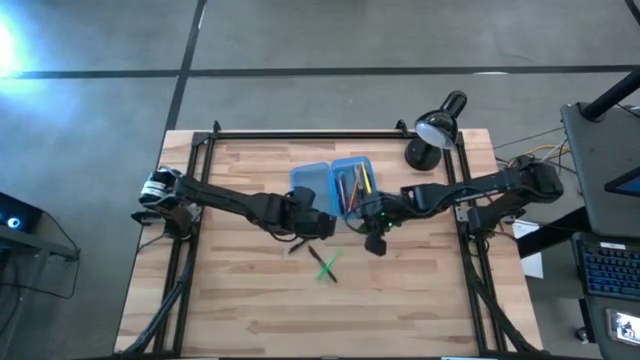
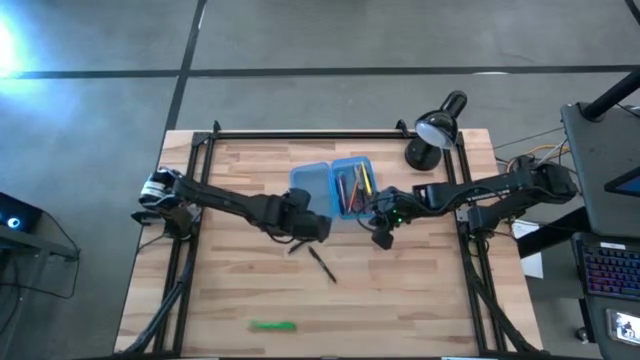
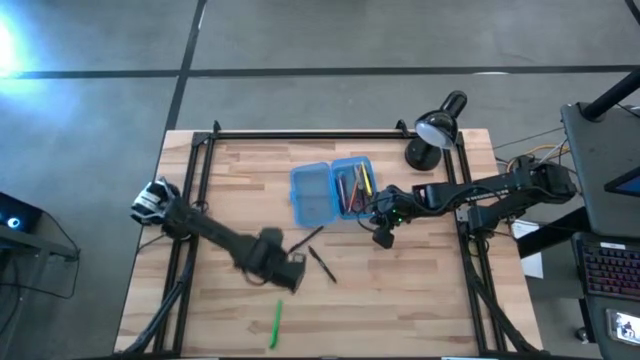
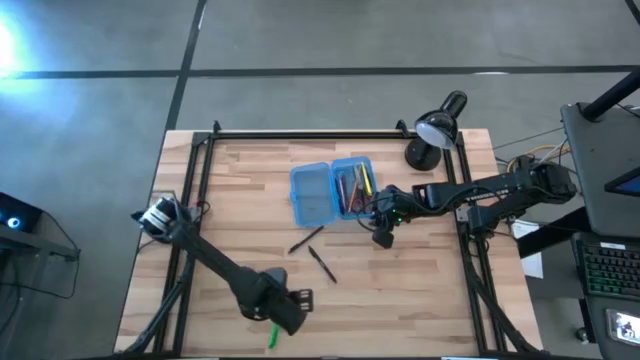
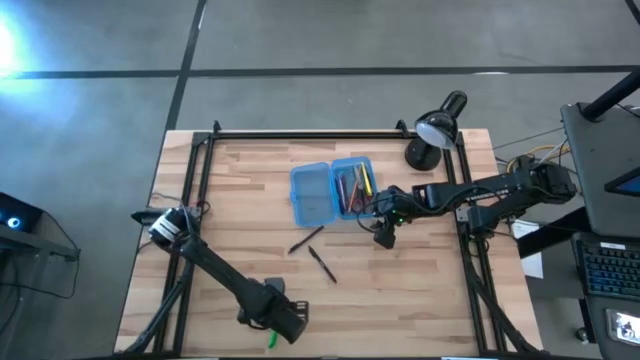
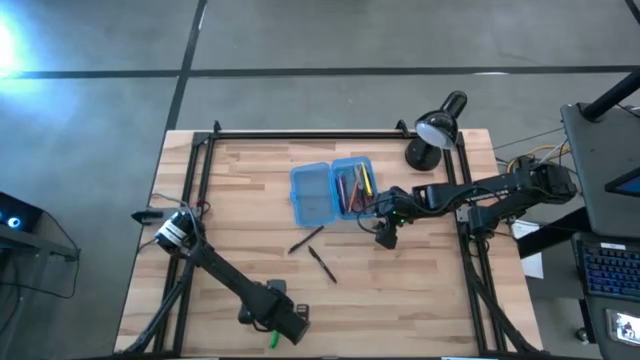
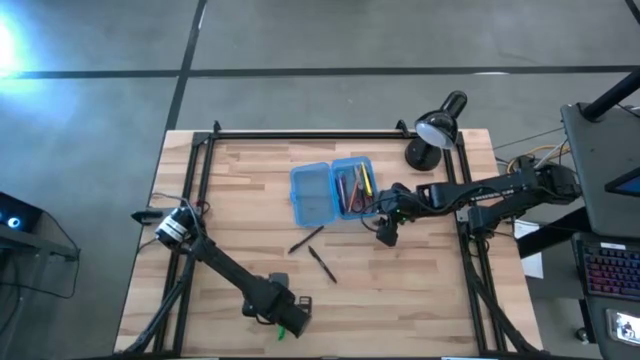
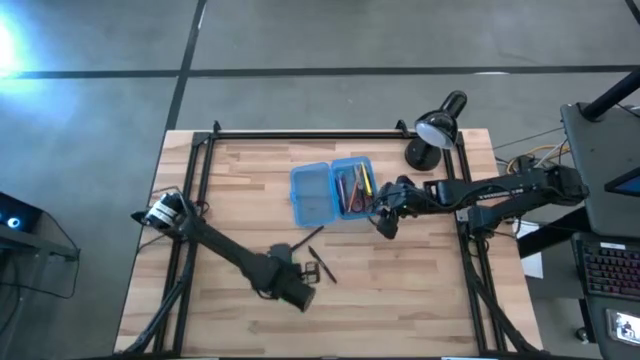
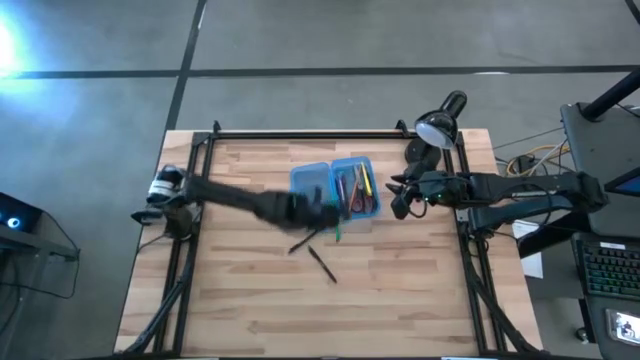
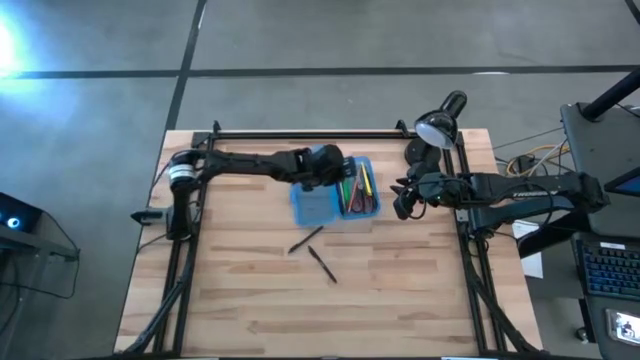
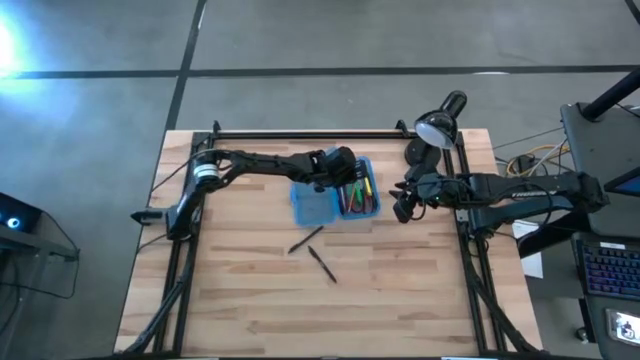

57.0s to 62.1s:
Task: Pick & place school supplies into a supply box
Put the green pen into the supply box

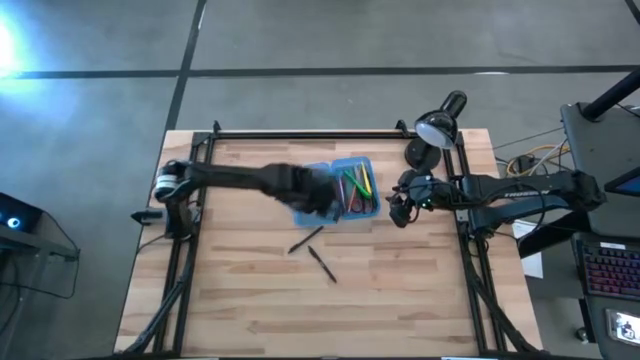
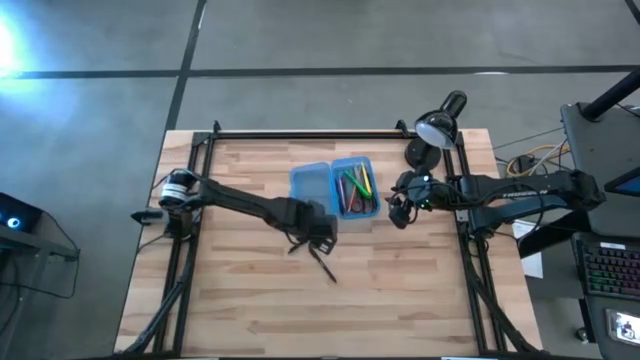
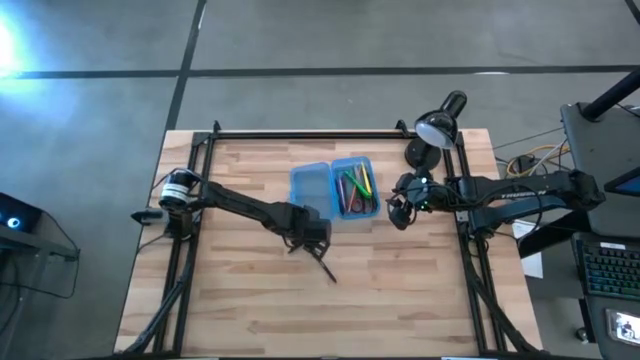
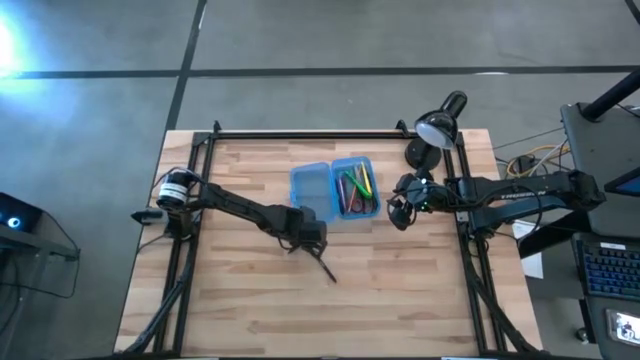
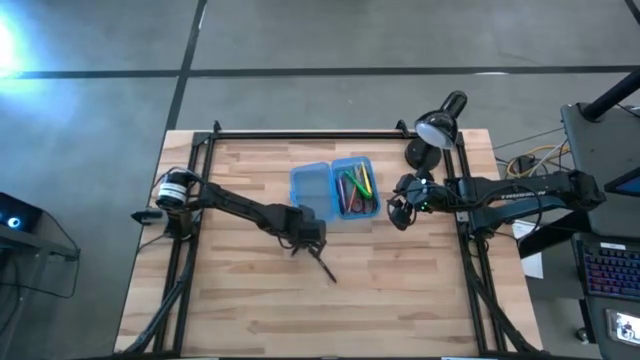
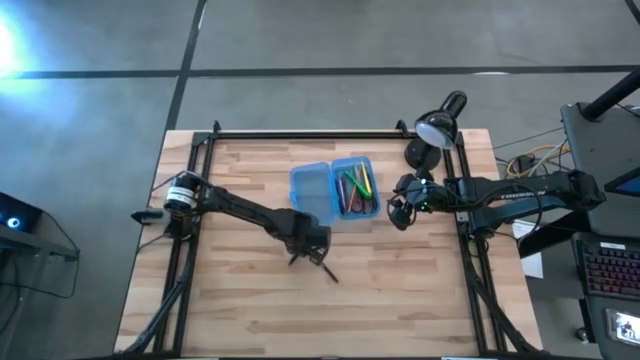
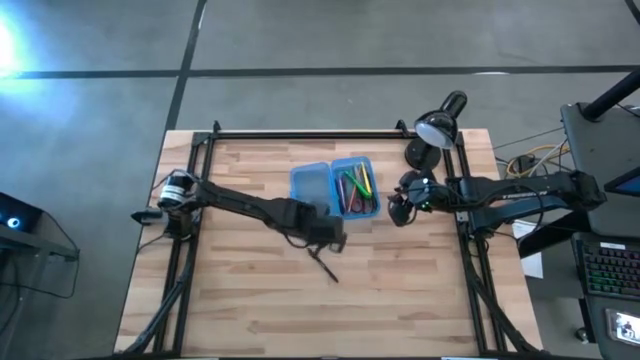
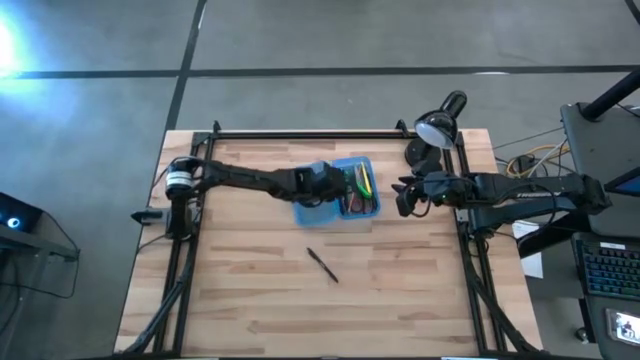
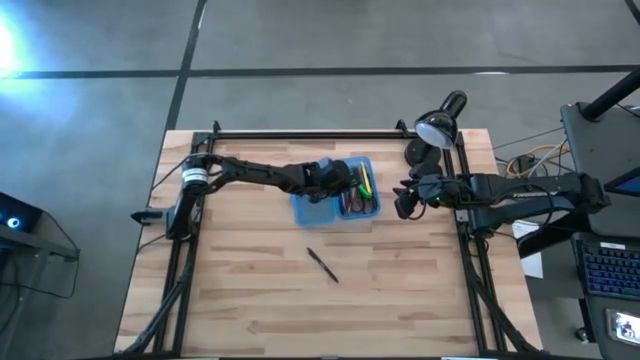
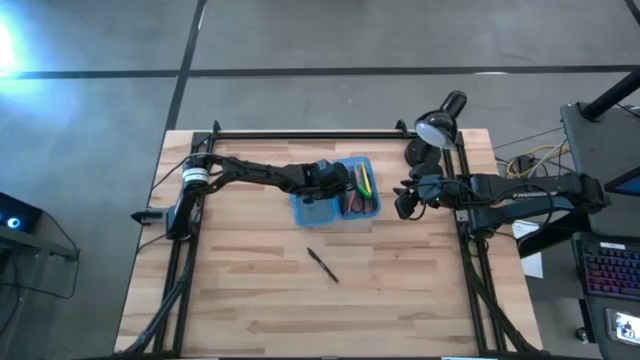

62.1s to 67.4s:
Put the black pen into the supply box

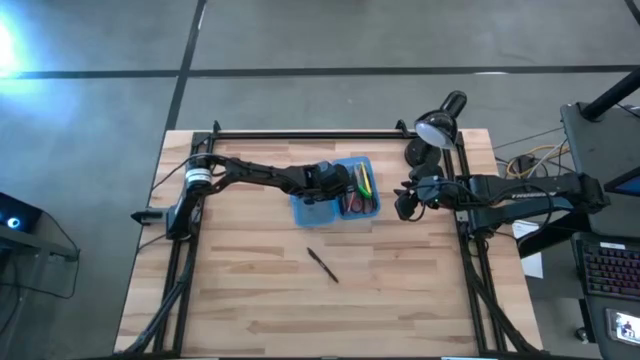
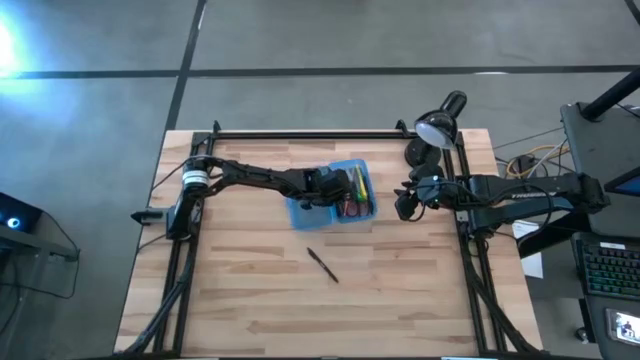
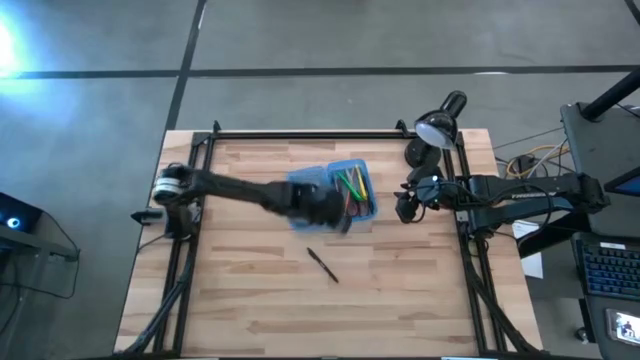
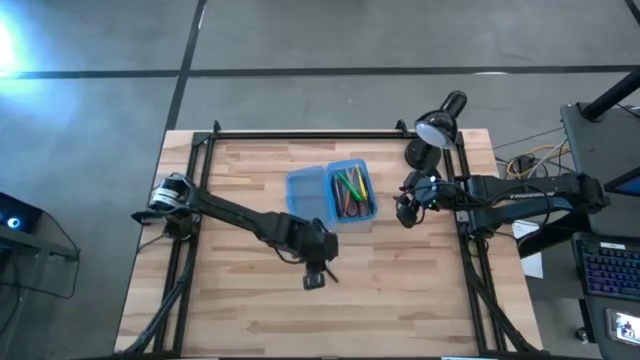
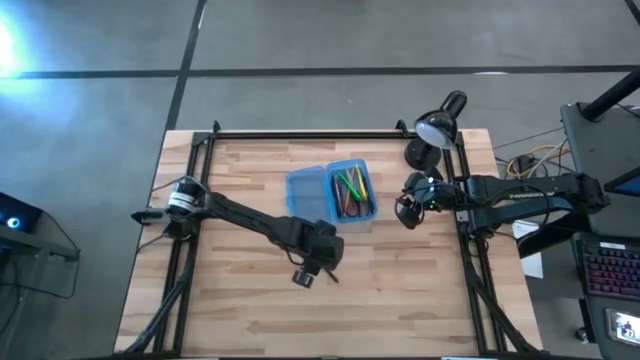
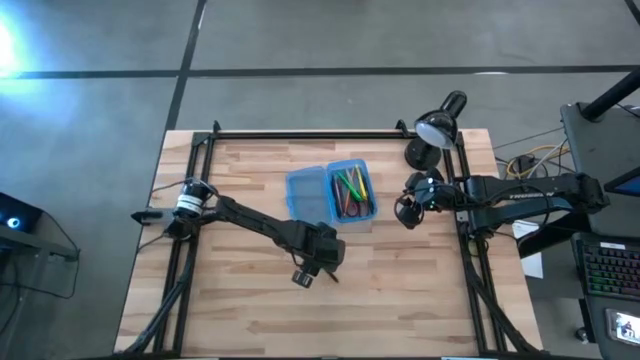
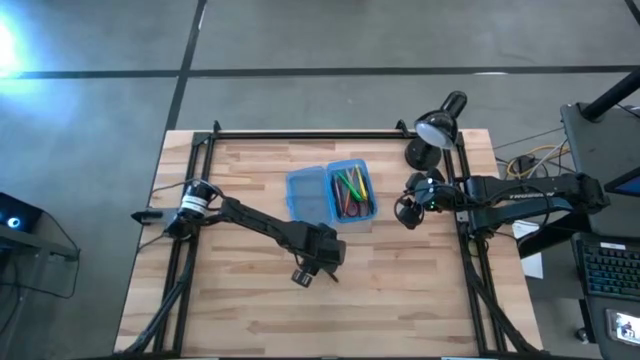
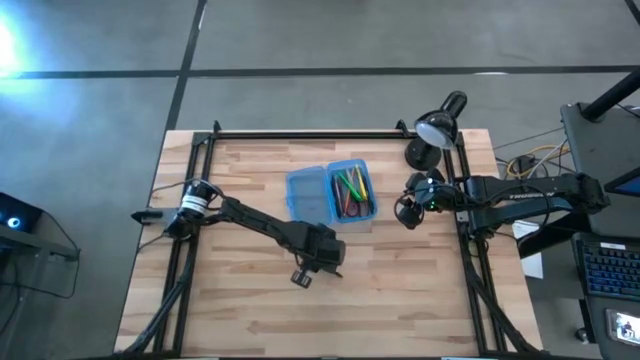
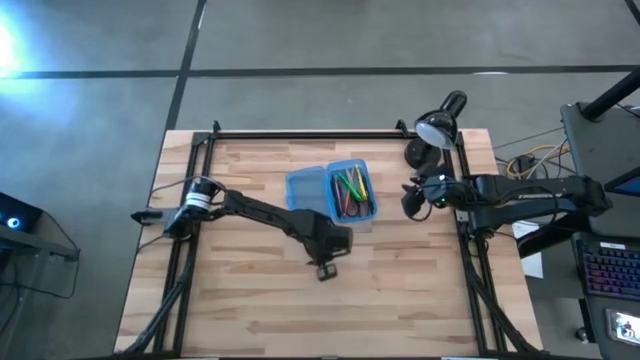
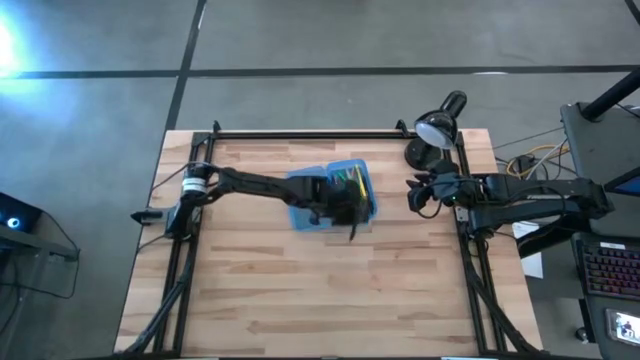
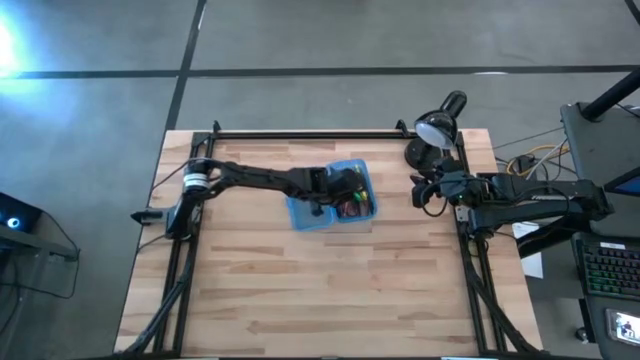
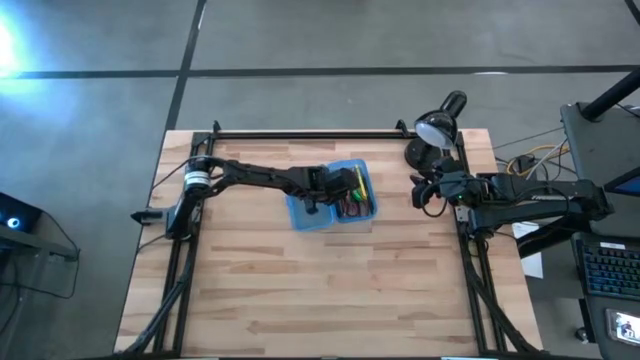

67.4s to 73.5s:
Put the black pen into the supply box

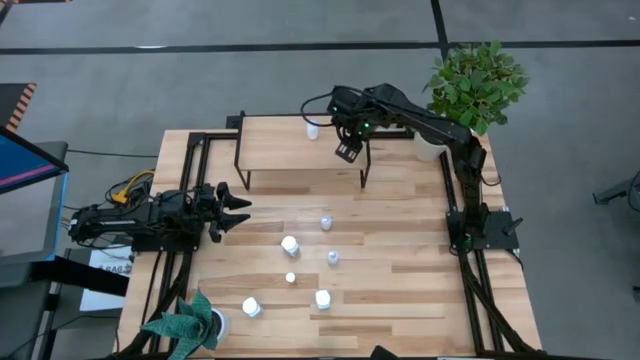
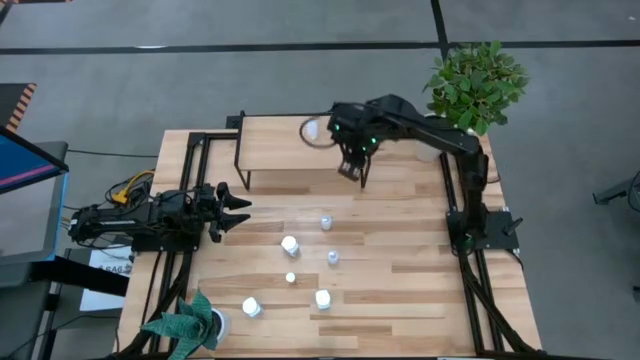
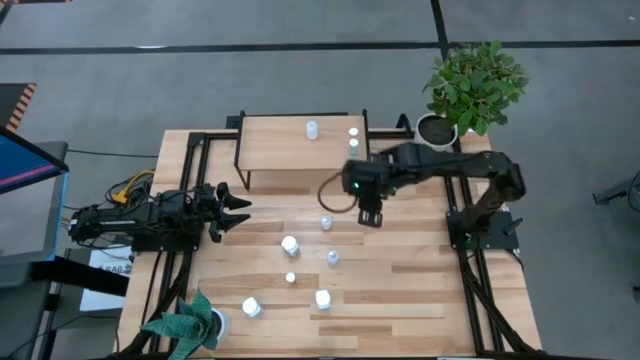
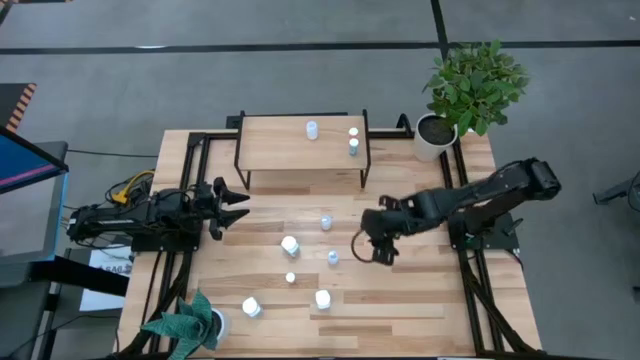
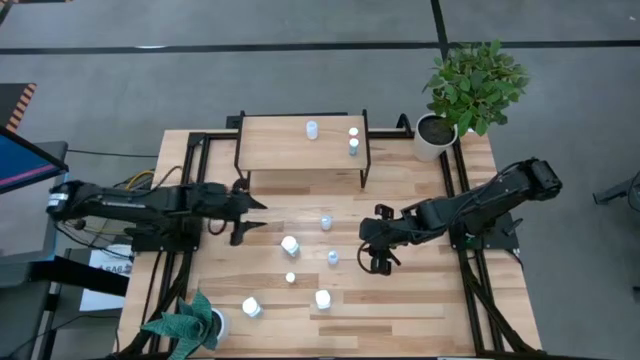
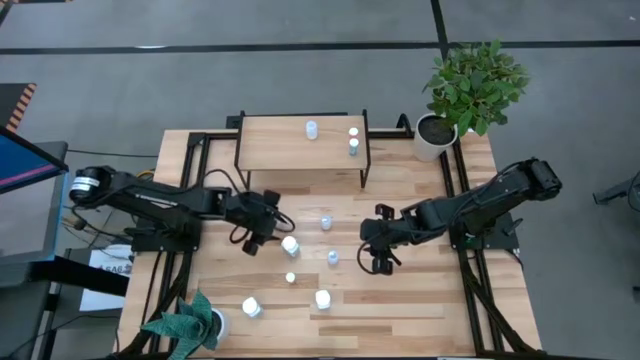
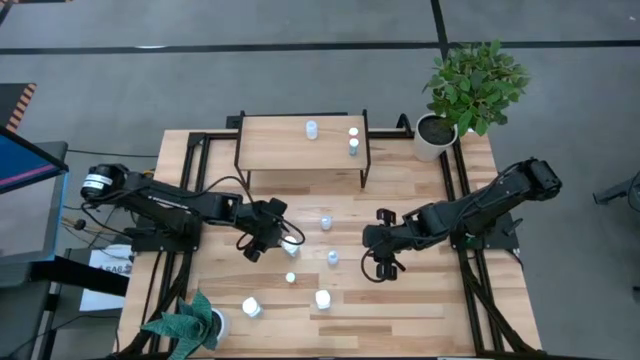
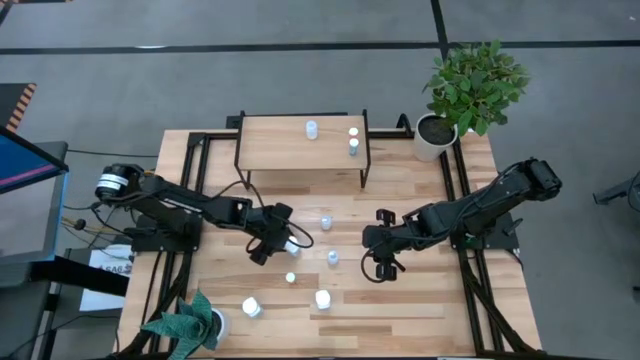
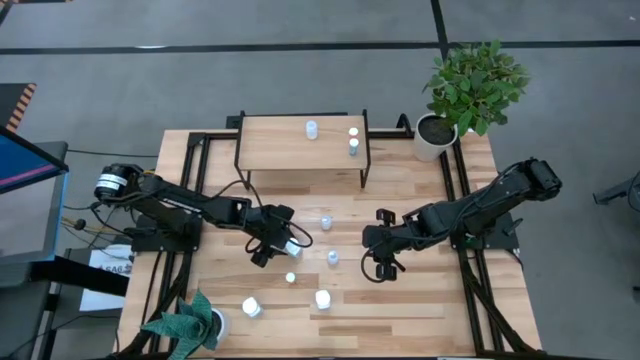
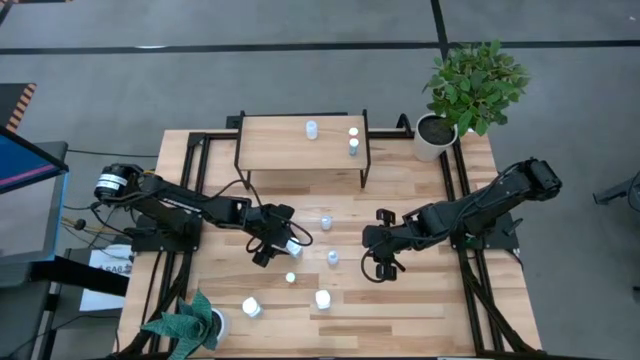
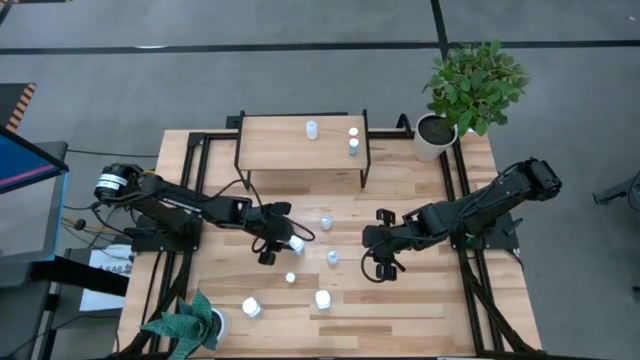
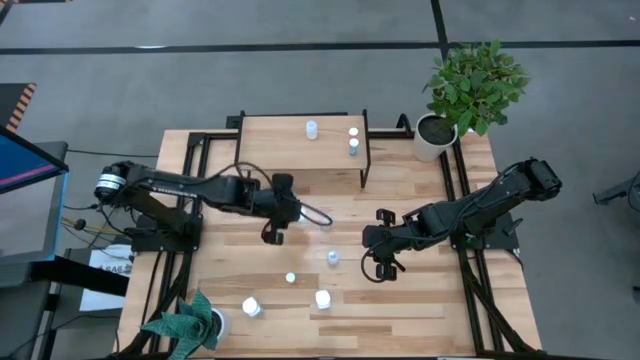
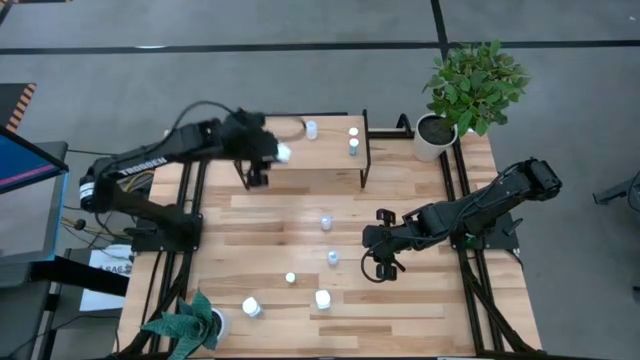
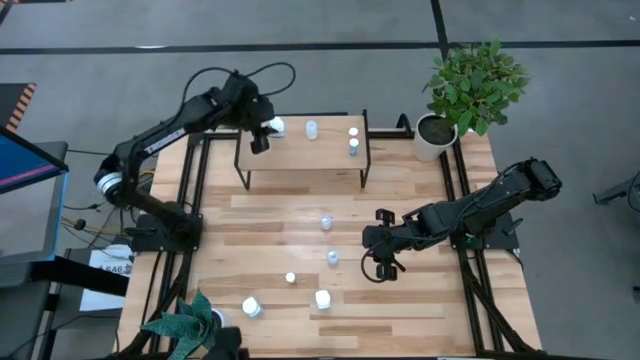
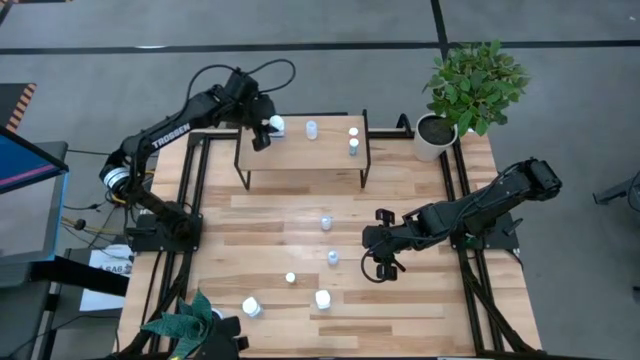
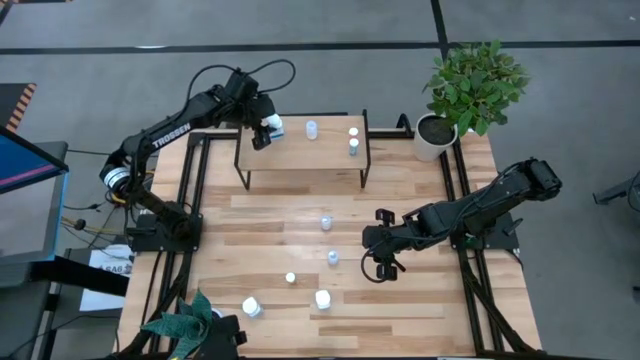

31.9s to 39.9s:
Task: Pick and place medicine bottles onto shelf by color
Put the top white pill bottle on the shelf
